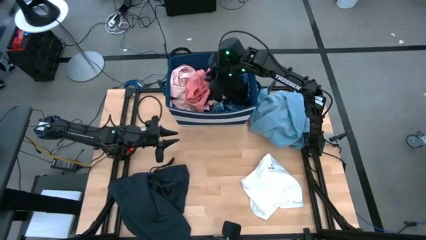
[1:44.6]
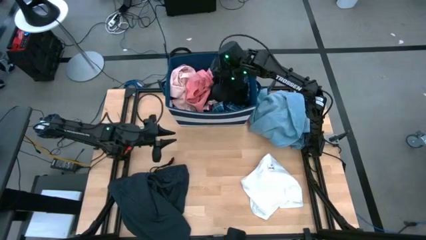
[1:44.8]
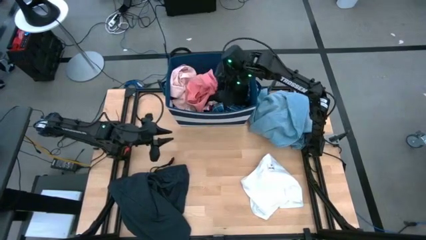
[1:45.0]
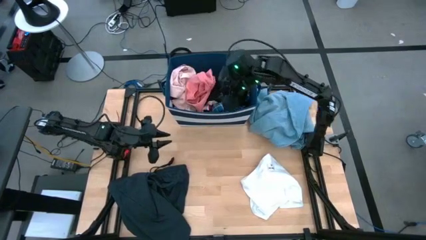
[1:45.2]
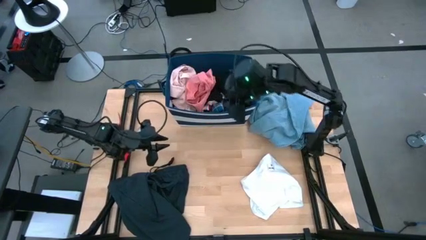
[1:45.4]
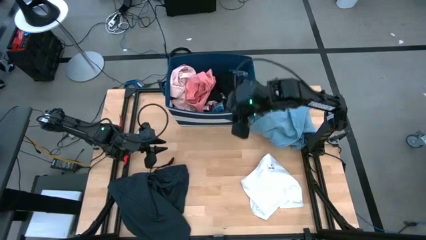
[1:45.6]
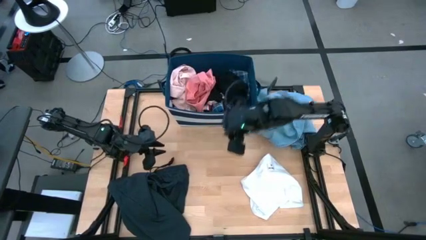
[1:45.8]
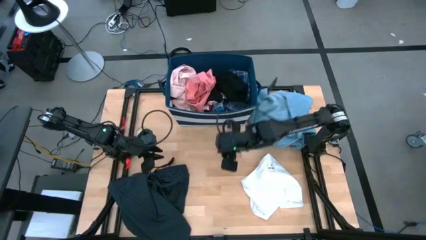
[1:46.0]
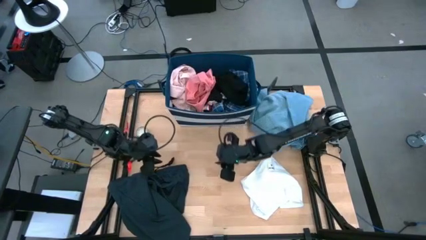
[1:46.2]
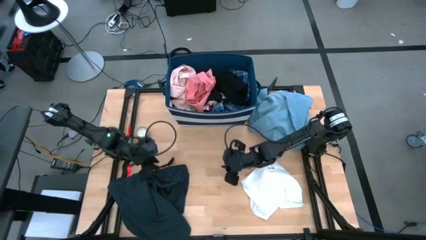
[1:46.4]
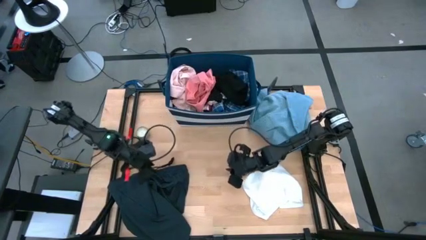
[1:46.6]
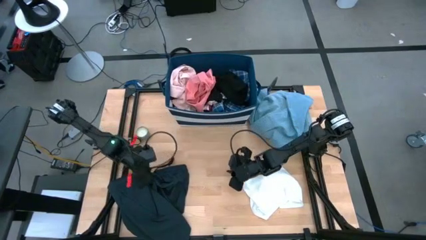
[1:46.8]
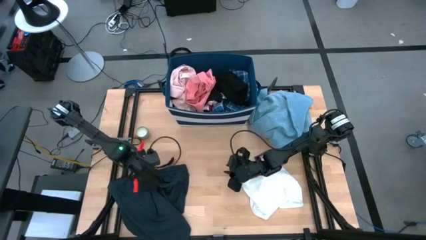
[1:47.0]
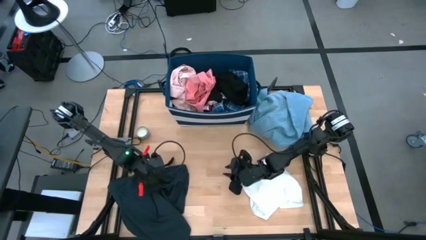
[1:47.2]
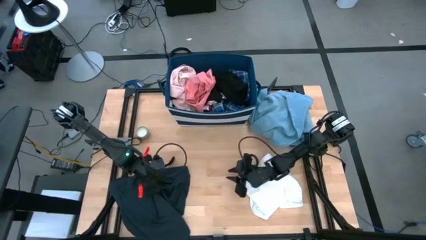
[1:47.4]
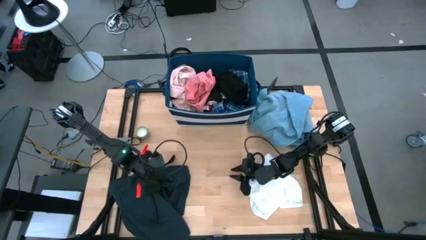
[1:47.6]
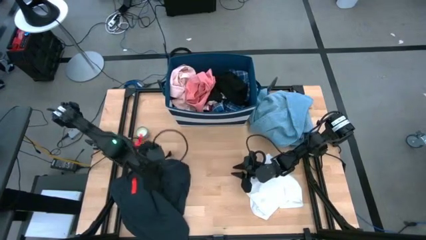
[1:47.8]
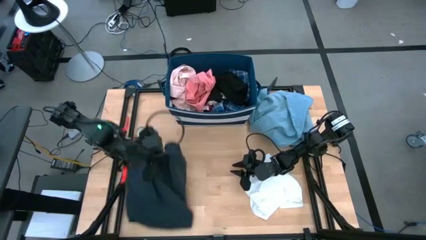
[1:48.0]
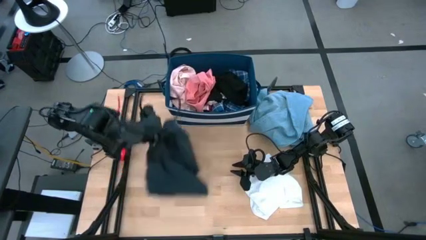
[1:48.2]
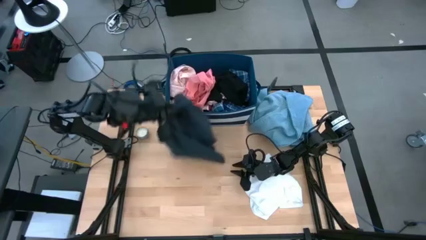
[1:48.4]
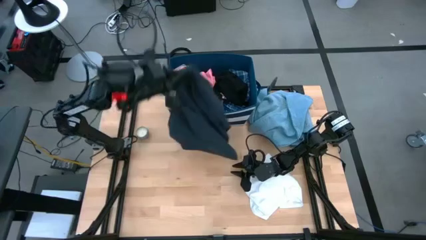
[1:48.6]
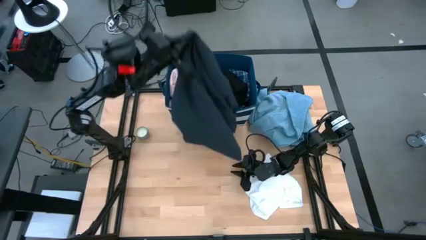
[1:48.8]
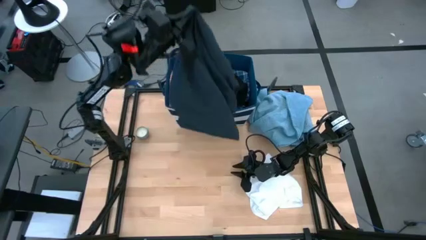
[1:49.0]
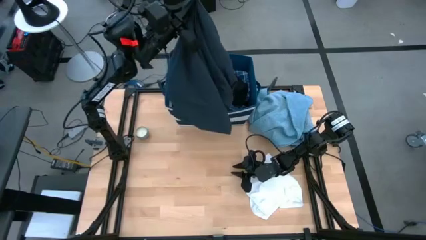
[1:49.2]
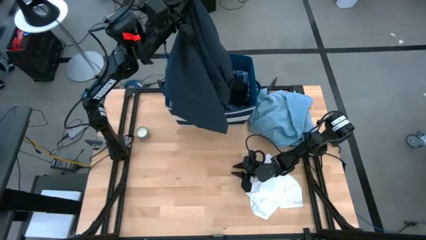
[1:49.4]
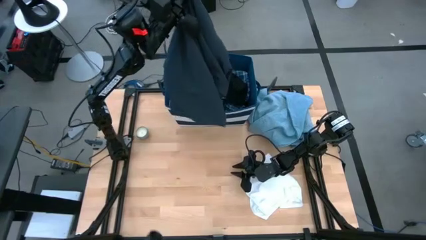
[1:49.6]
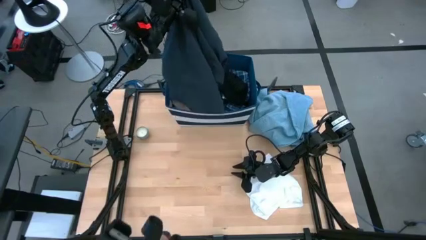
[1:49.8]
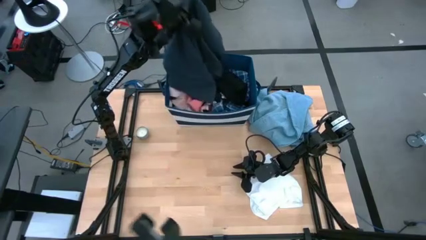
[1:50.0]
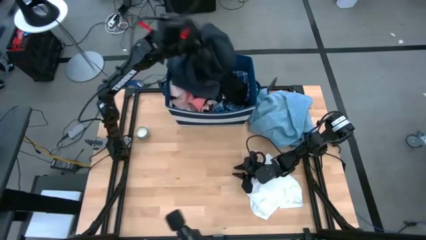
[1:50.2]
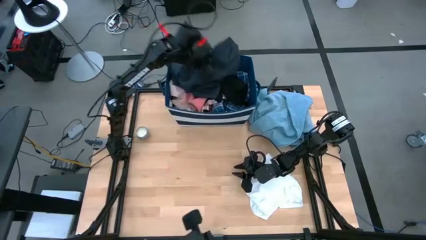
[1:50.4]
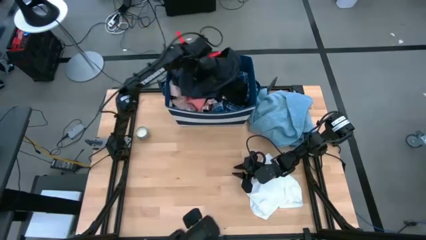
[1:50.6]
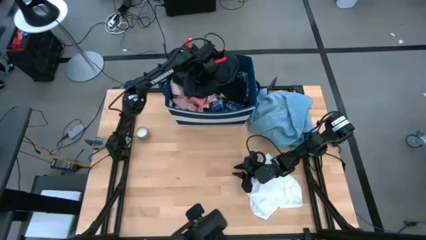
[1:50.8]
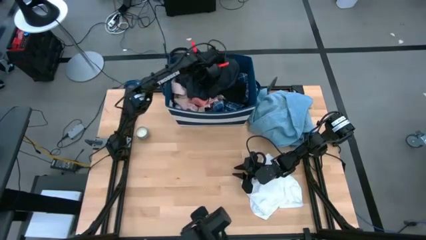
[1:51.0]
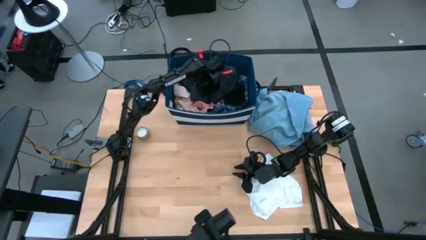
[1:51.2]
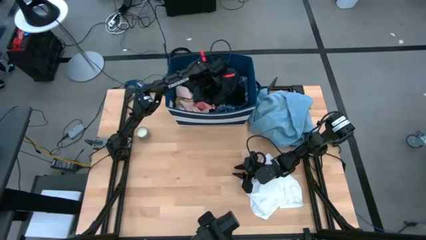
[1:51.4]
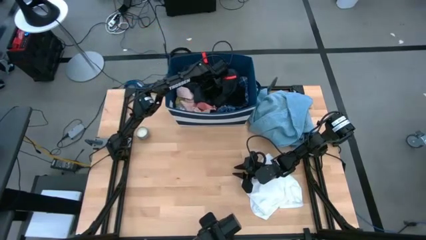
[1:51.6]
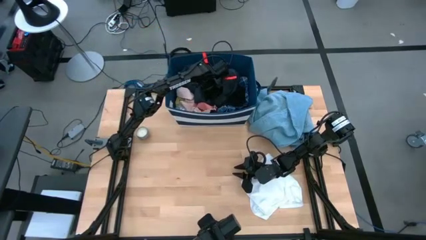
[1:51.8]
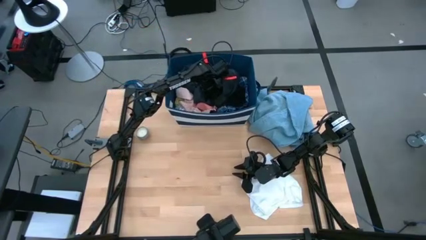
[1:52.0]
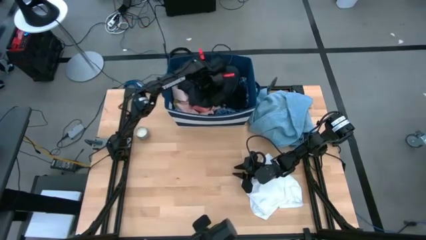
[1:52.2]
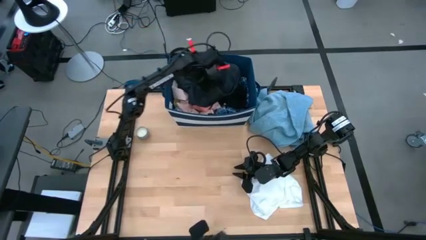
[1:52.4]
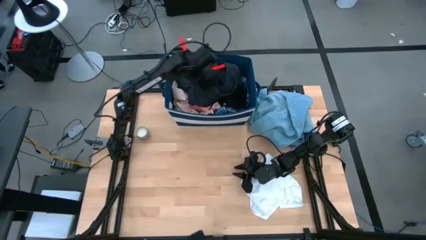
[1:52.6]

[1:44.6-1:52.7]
Task: Sort clothes
Put the green short into the blue laundry organizer

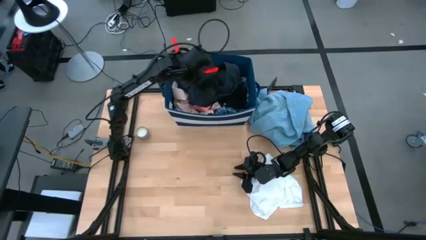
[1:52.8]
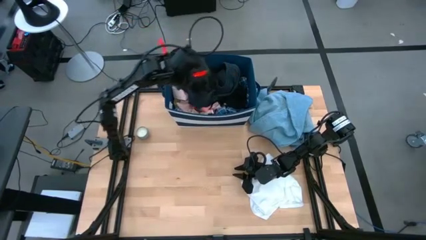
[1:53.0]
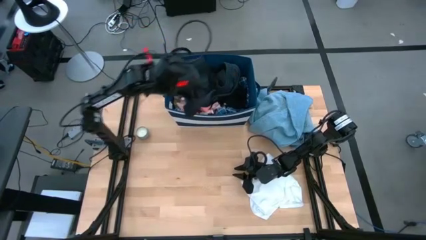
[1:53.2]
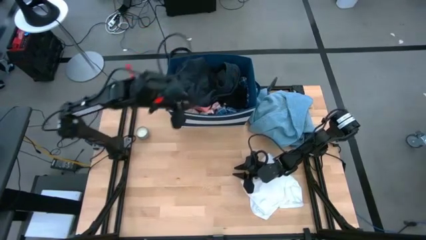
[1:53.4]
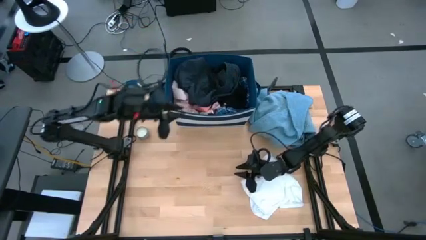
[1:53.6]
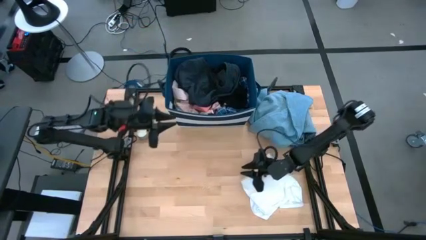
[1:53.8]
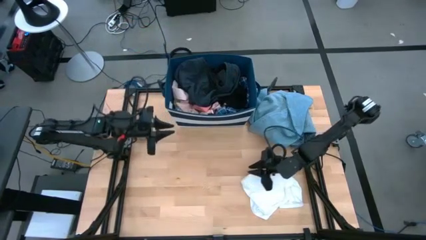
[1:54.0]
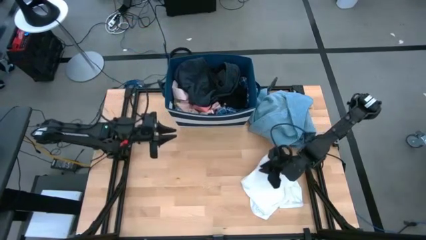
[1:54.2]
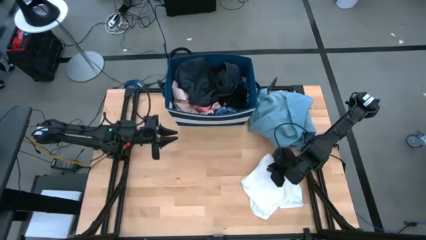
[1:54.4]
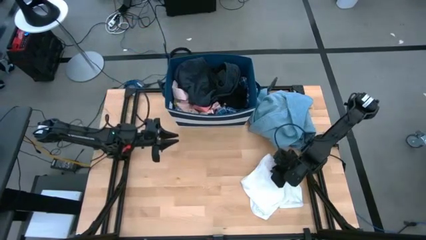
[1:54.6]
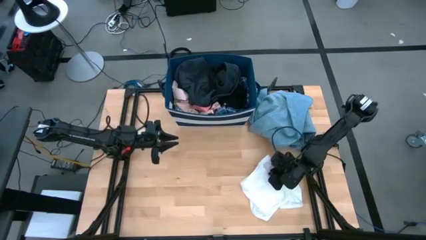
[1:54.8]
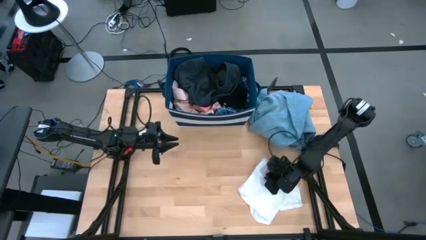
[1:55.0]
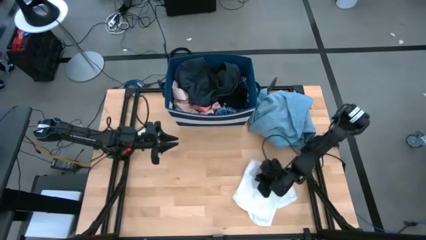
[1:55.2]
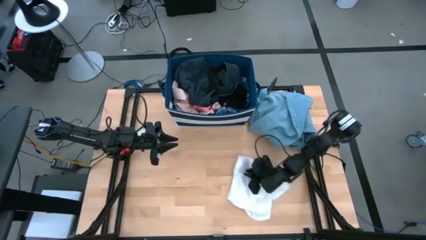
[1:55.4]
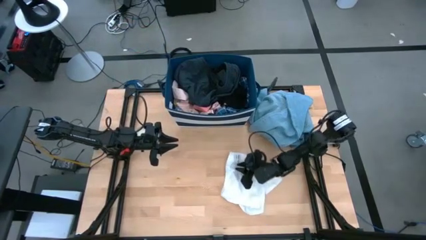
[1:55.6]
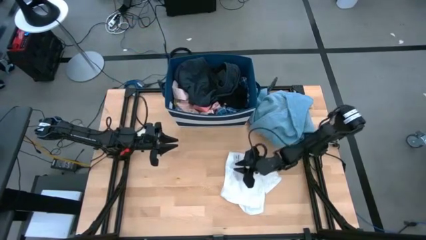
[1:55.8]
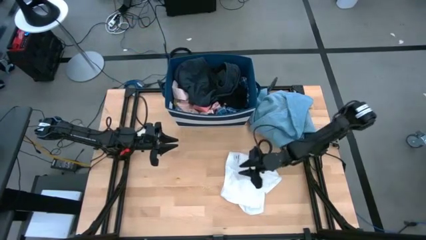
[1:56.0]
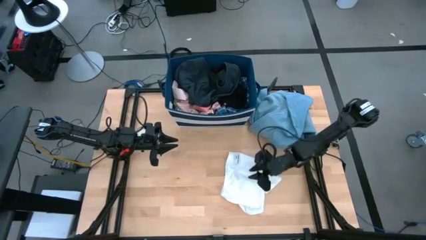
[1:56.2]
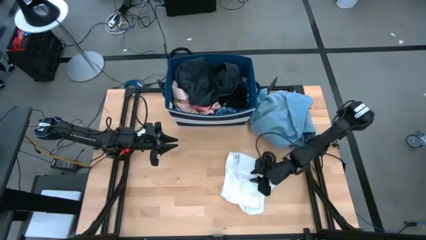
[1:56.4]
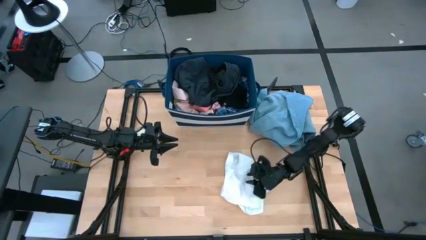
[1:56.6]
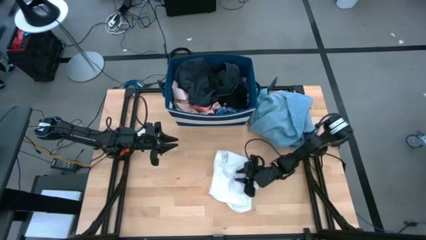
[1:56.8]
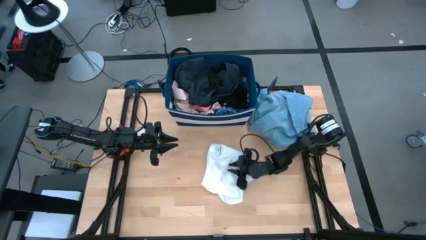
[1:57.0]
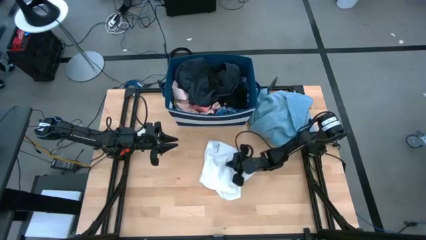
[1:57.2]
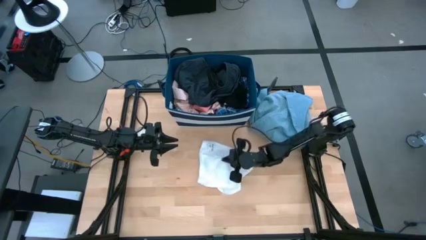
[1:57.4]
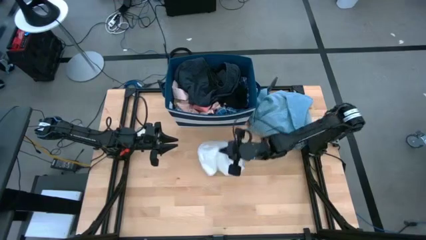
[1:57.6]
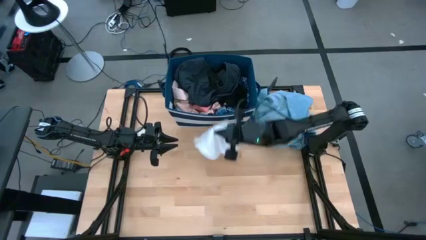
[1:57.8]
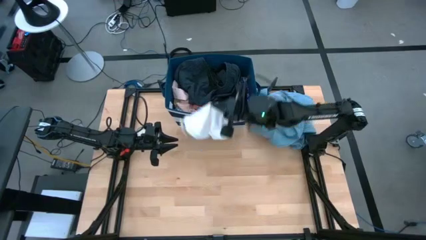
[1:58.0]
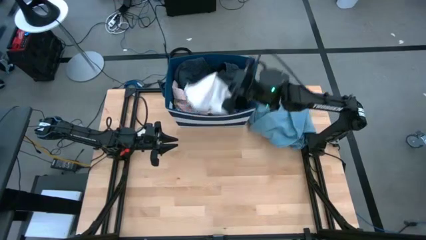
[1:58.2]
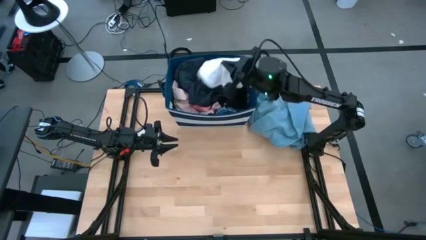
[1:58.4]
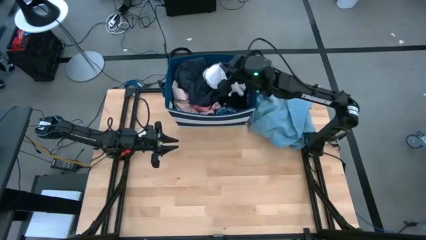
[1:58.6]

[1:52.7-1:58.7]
Put the white short into the blue laundry organizer

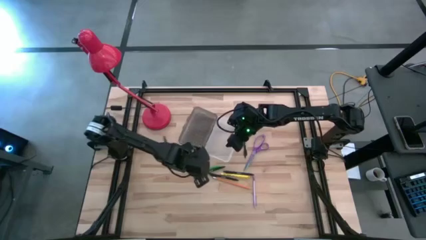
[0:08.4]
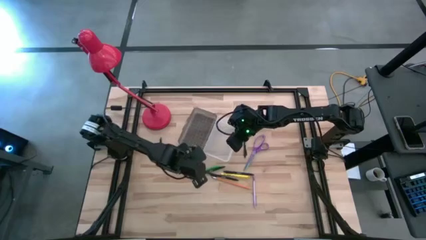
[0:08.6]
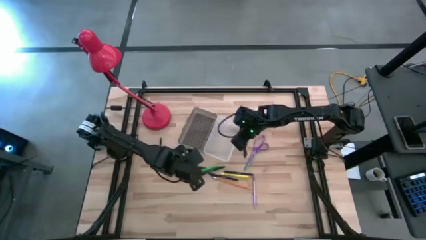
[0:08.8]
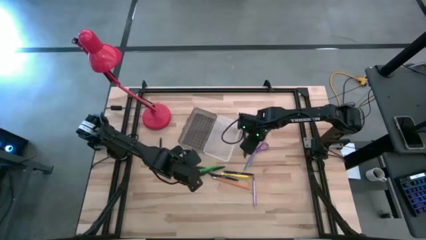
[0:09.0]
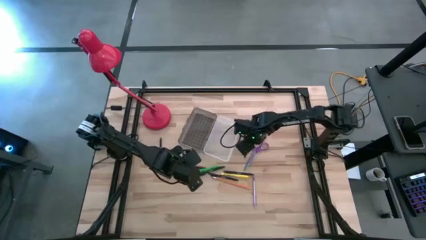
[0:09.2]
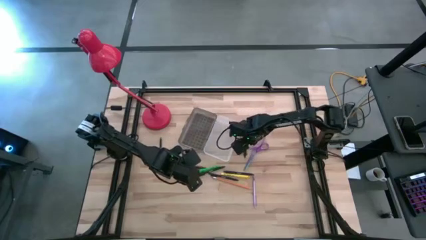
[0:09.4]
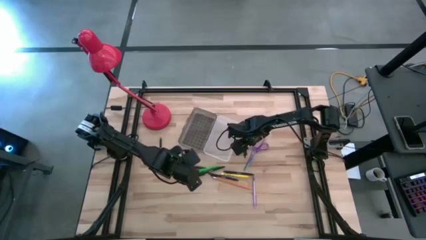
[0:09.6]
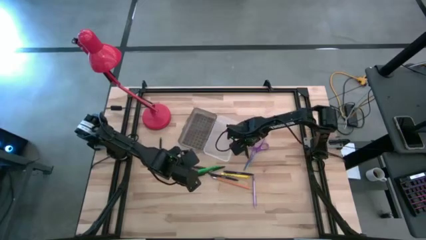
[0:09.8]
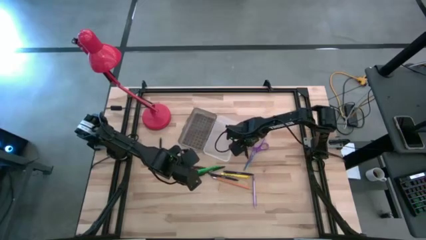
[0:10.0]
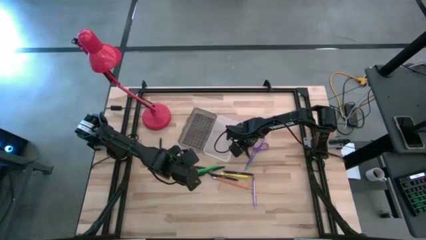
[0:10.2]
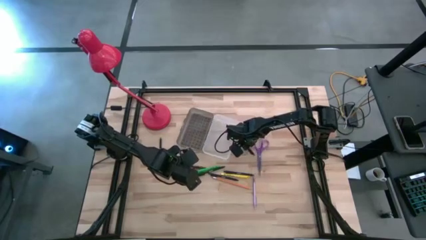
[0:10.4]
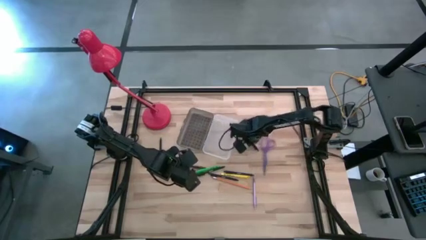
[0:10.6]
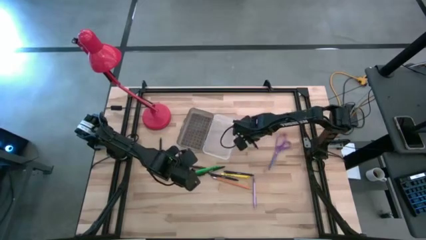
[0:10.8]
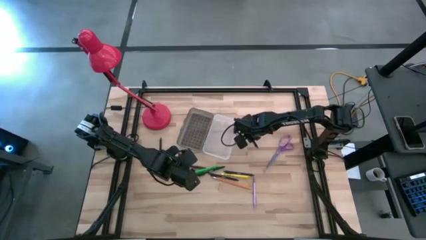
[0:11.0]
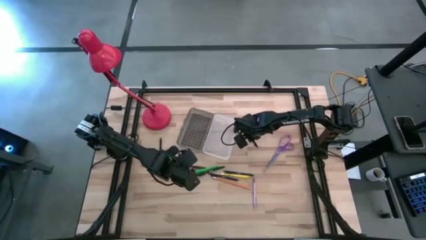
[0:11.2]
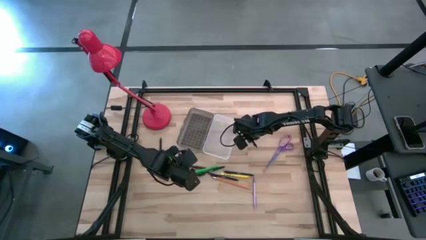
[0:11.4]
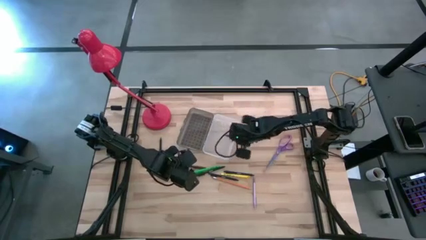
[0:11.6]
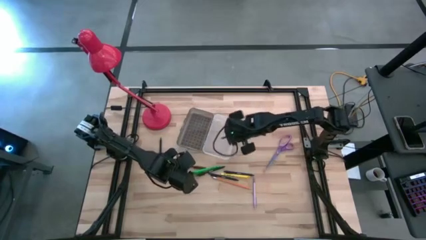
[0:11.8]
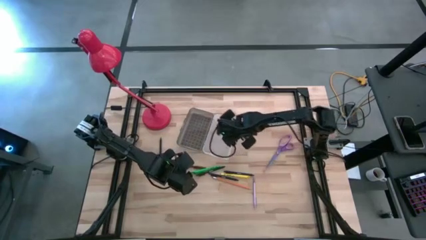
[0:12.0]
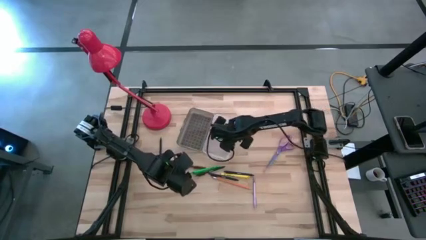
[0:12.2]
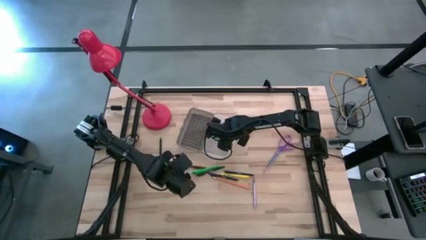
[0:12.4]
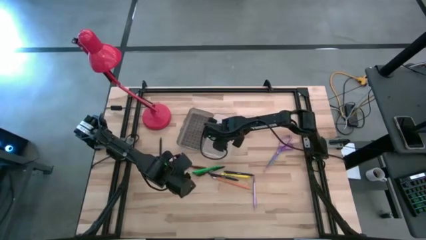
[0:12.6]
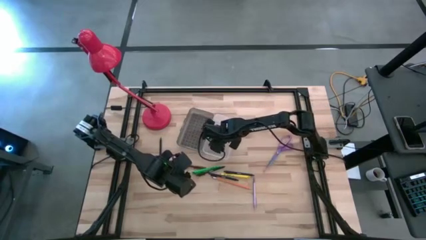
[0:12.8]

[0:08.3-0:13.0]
Task: Pick & place school supplies into a supply box
Put the black pen into the supply box
